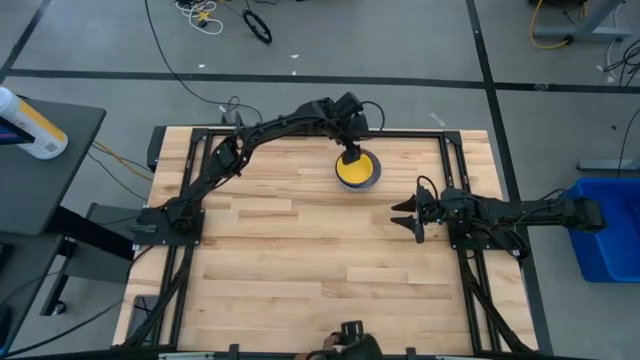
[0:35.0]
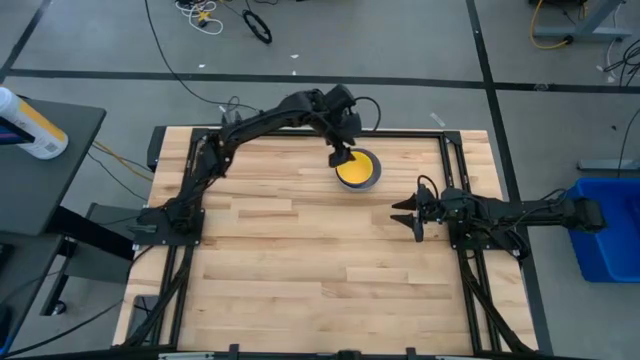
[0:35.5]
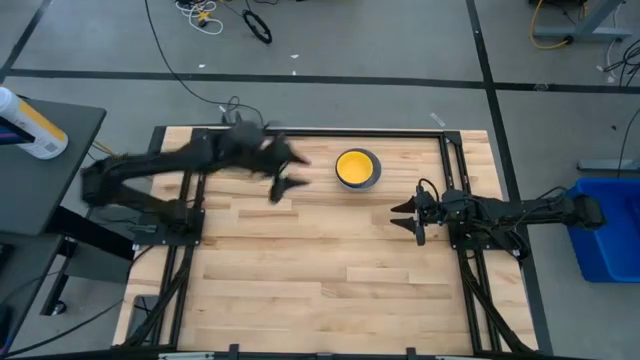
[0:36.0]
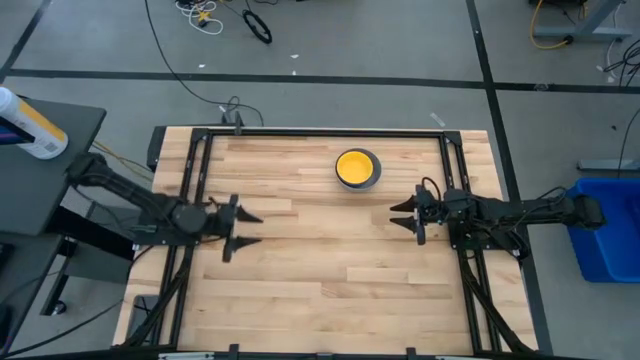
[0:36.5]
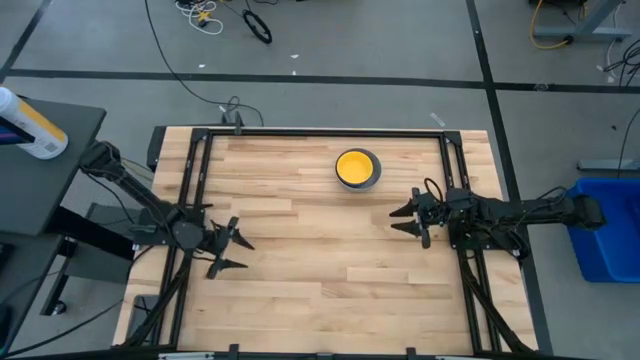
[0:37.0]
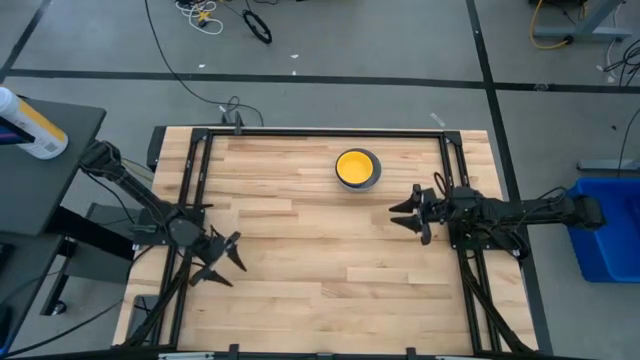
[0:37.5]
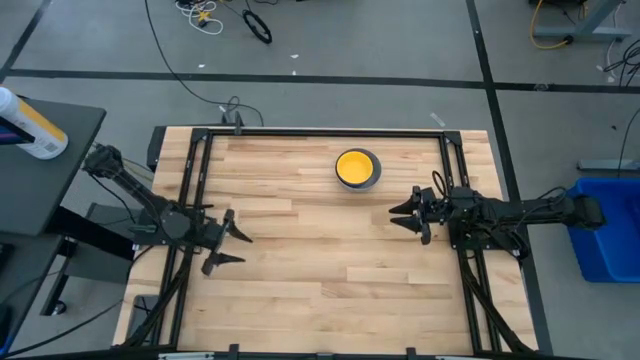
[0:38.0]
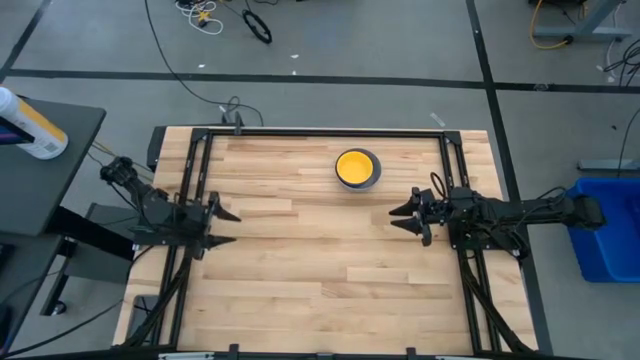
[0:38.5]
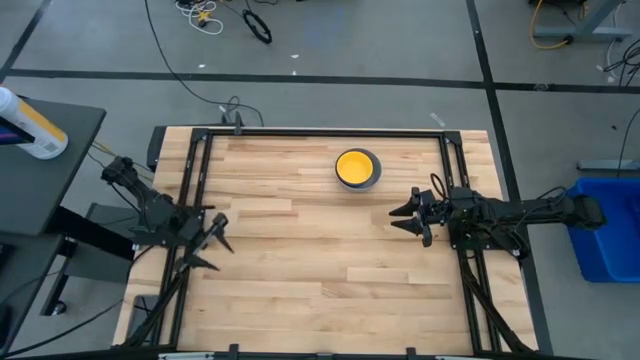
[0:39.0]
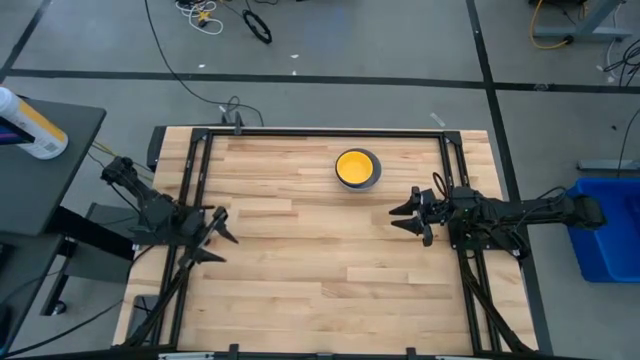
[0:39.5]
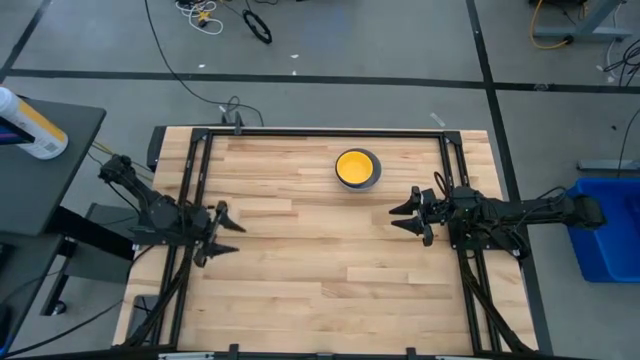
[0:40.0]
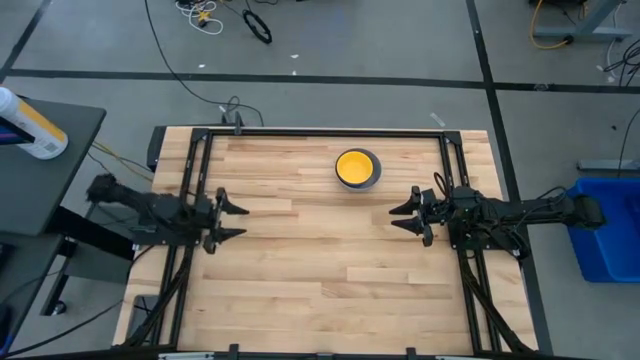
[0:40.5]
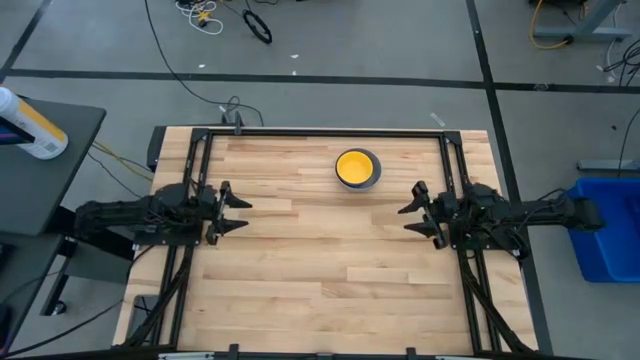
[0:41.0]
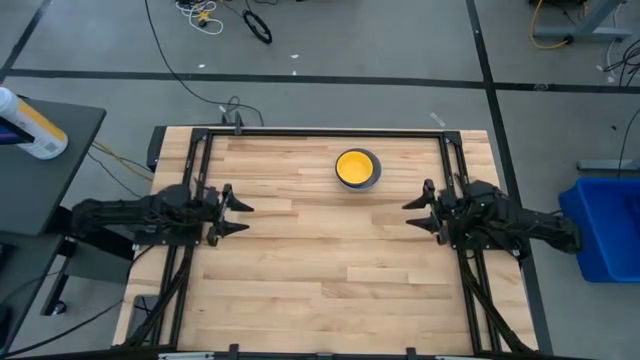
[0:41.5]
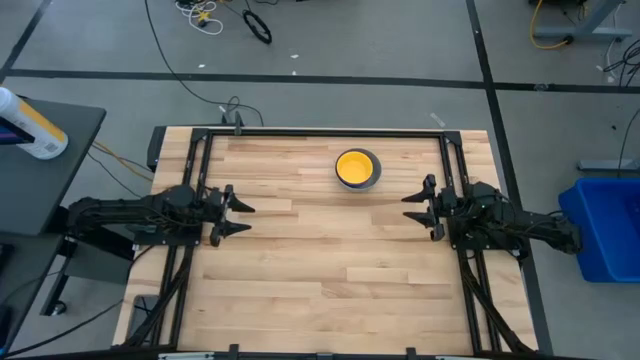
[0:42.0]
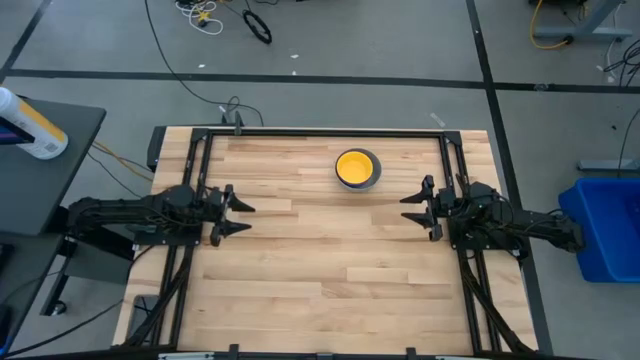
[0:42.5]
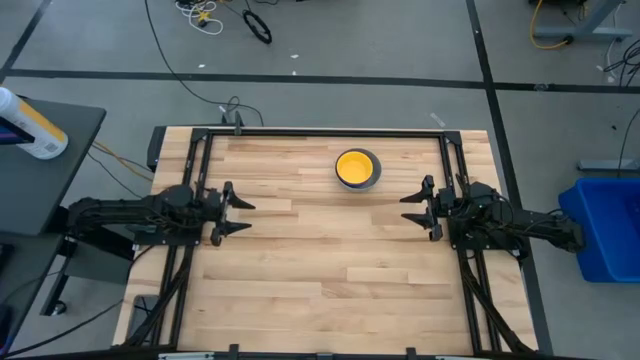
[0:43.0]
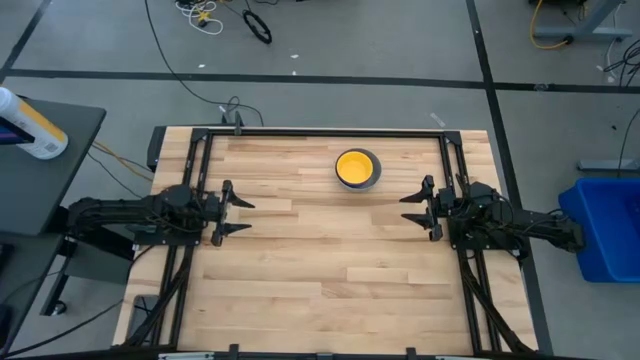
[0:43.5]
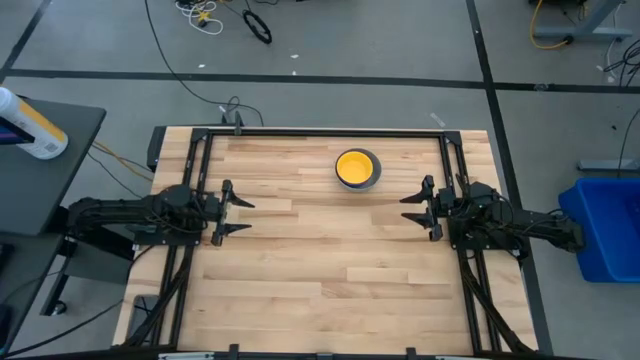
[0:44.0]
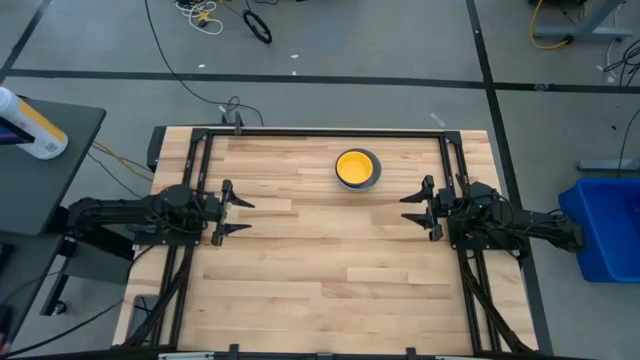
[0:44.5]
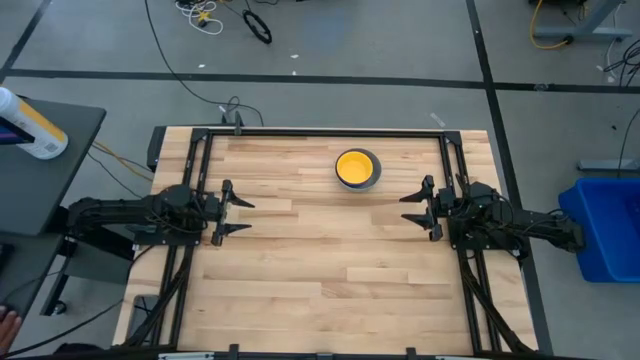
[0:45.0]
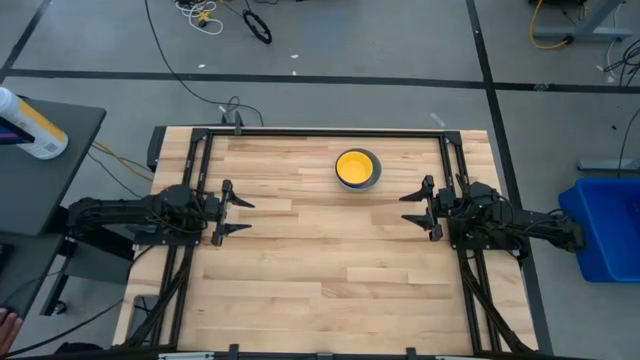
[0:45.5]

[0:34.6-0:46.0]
Return to Home Position

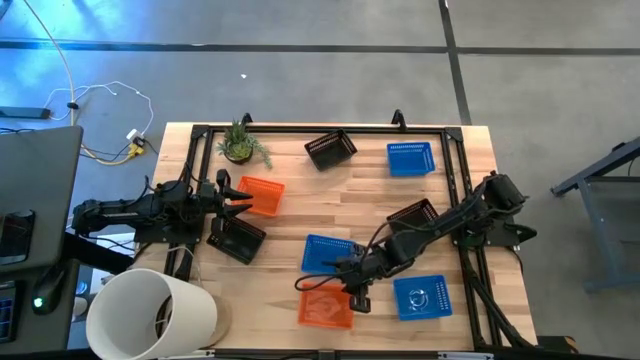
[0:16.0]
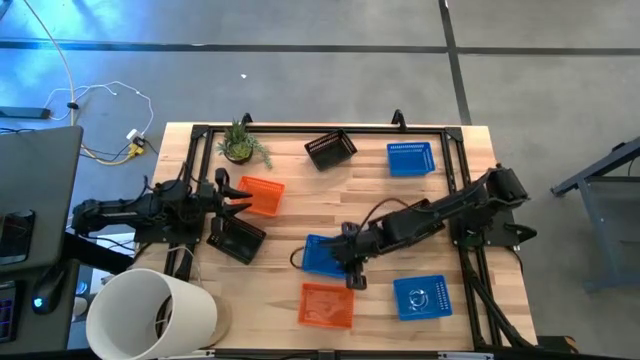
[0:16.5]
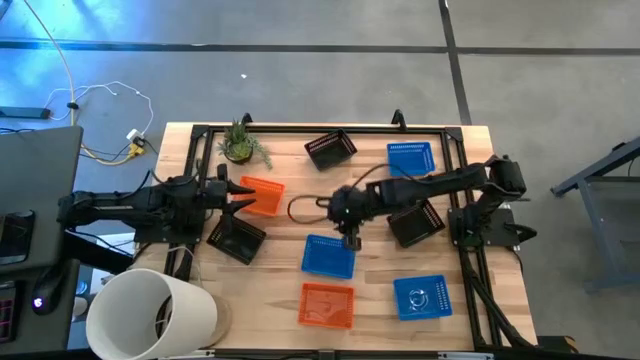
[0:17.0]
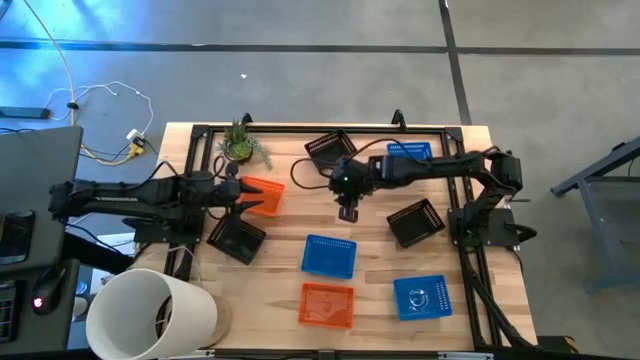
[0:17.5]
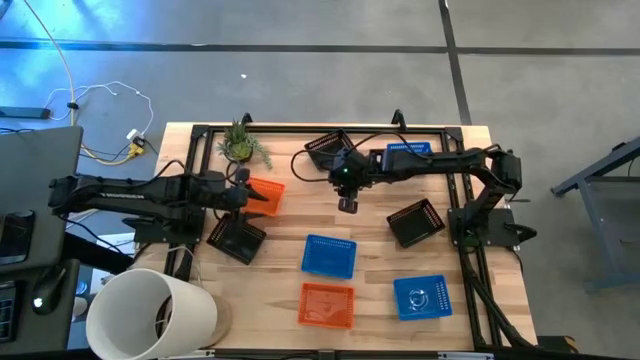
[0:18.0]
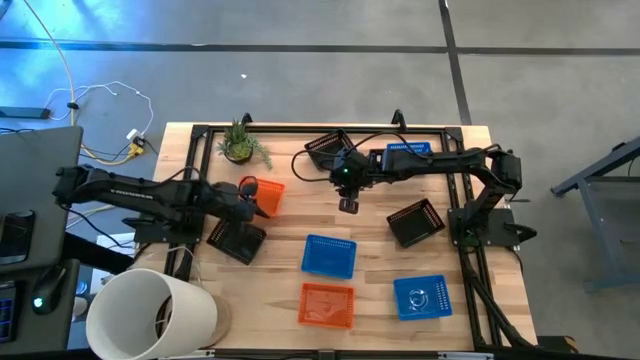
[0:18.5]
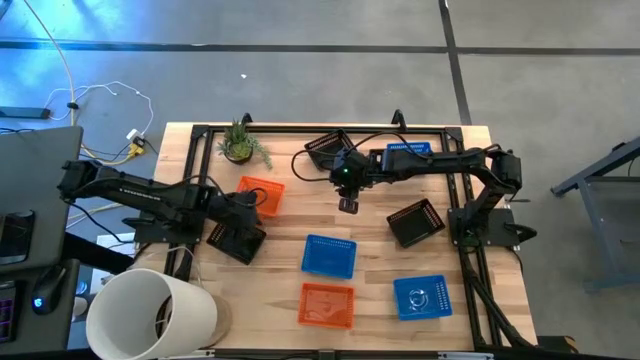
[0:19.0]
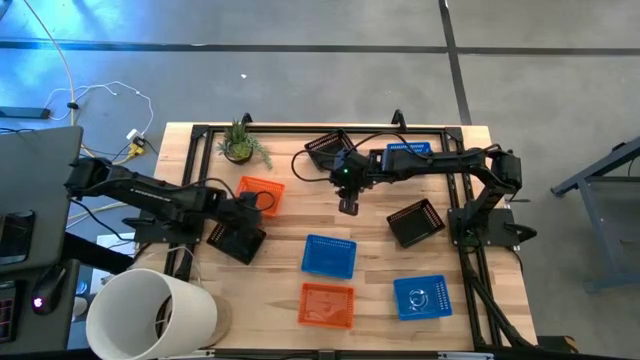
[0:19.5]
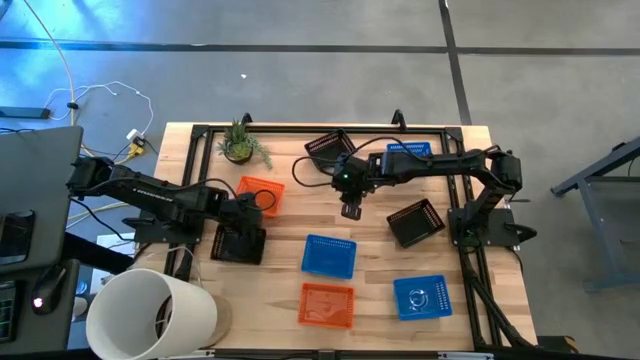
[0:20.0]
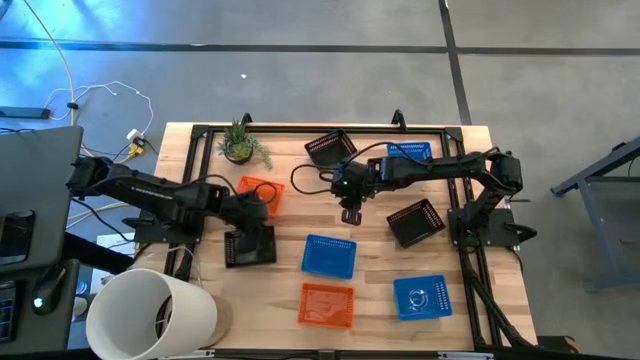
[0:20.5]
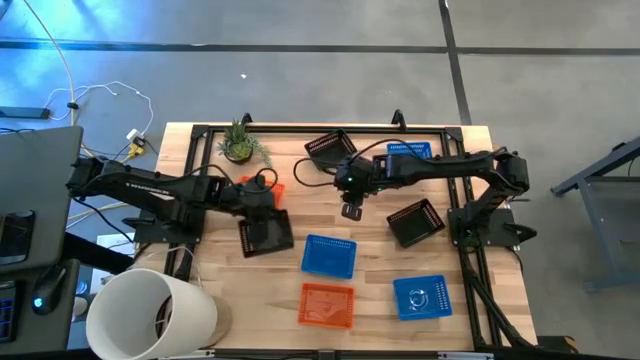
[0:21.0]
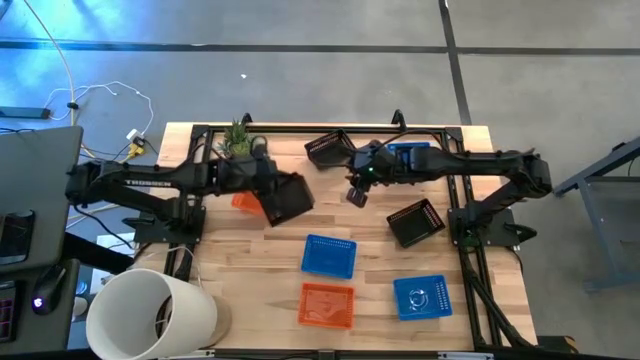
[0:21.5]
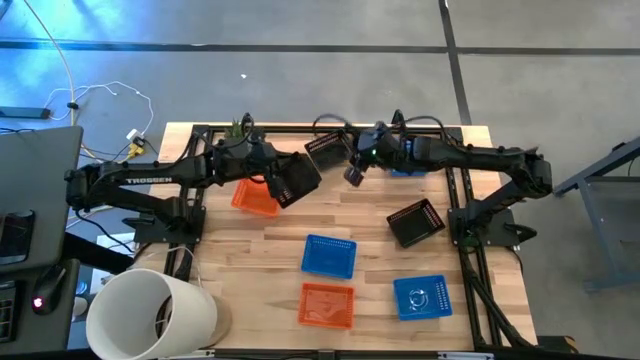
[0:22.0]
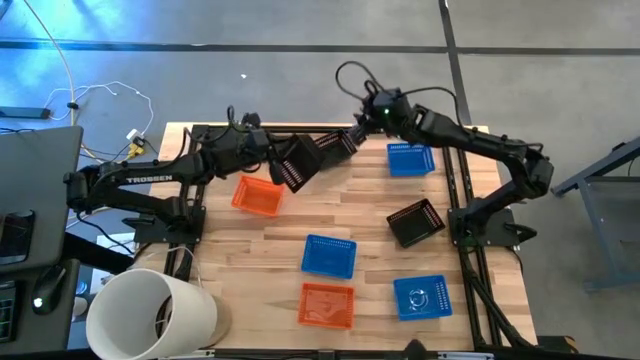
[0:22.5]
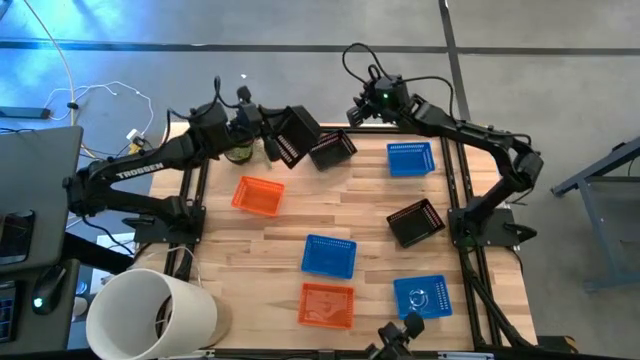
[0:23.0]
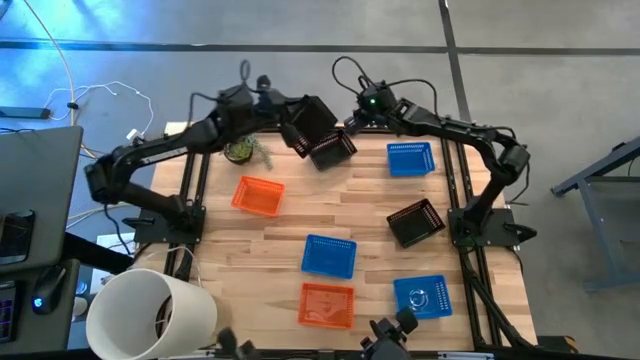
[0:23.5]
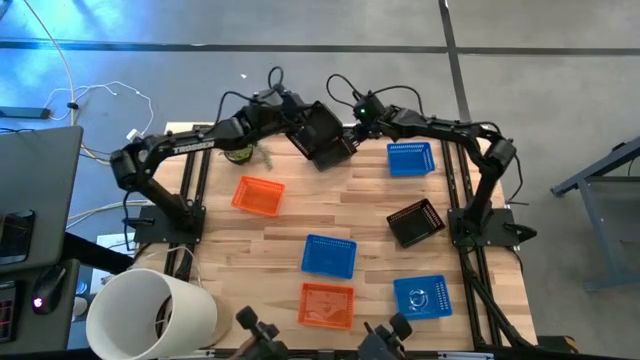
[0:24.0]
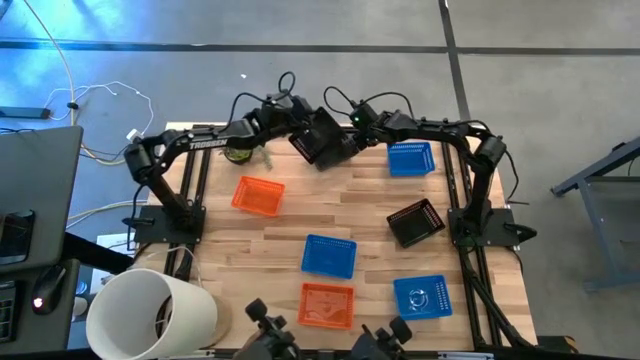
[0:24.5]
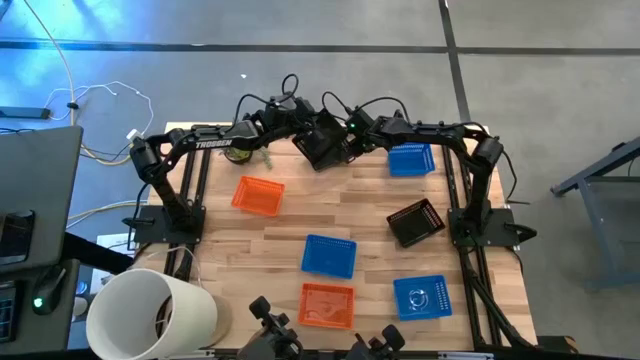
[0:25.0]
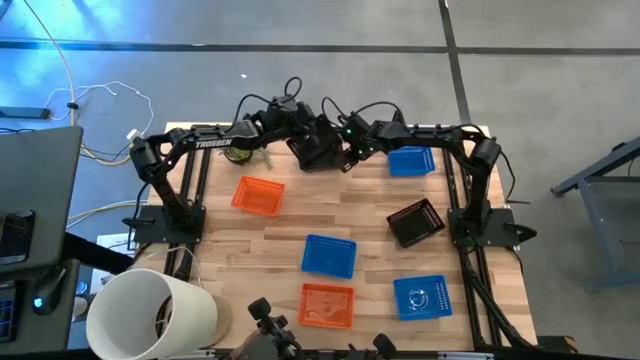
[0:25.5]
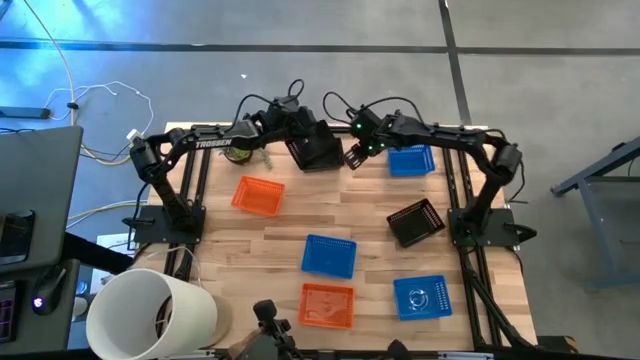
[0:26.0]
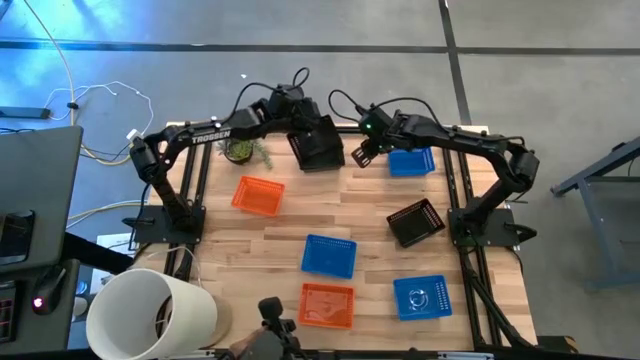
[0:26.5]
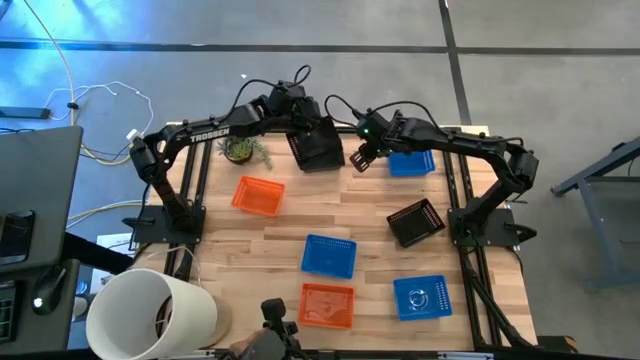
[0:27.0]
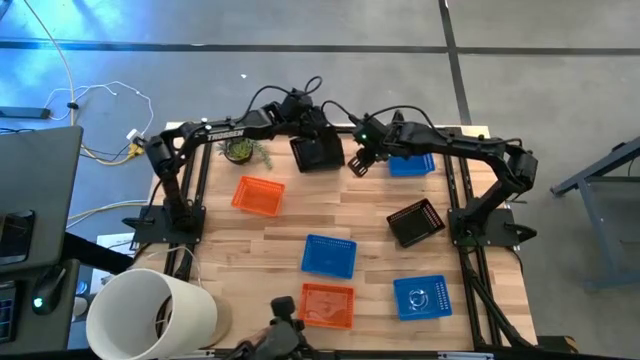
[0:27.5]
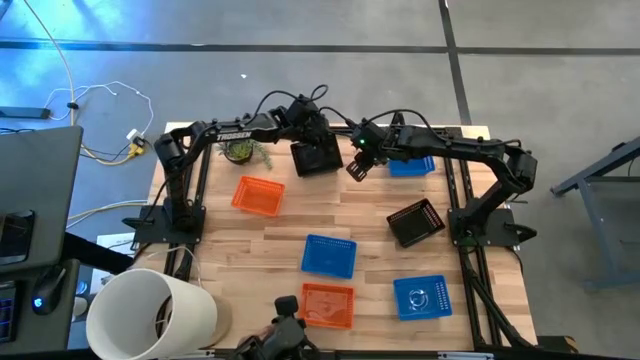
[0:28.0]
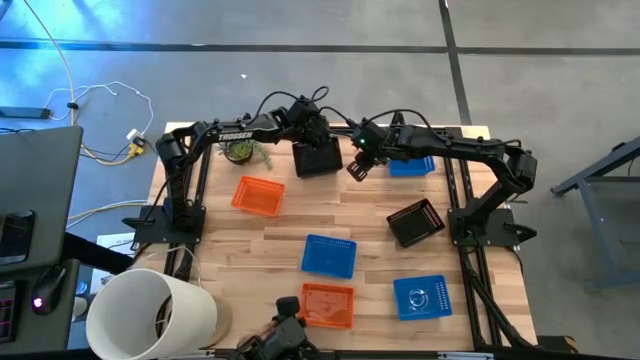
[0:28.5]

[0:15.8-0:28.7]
Stack the left black basket on top of the middle black basket
